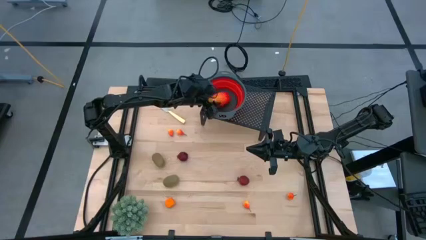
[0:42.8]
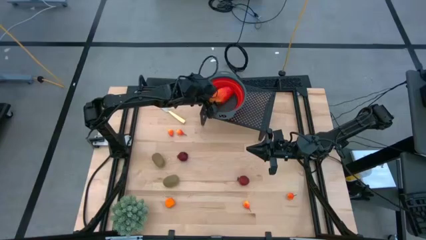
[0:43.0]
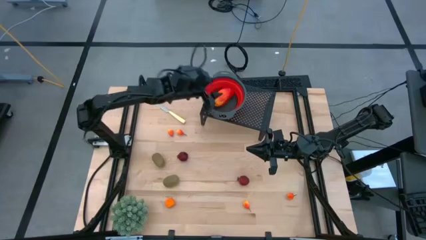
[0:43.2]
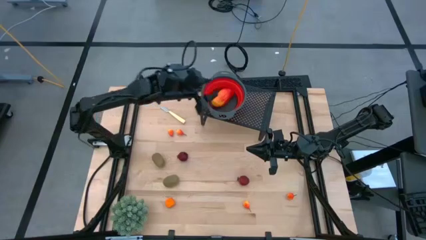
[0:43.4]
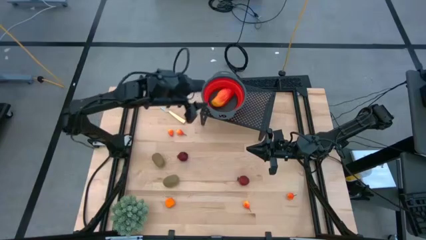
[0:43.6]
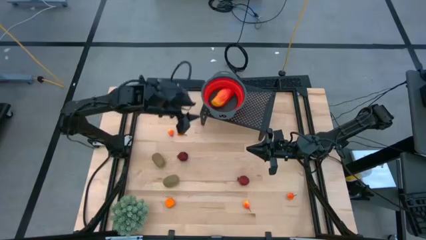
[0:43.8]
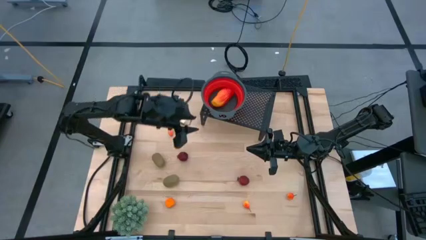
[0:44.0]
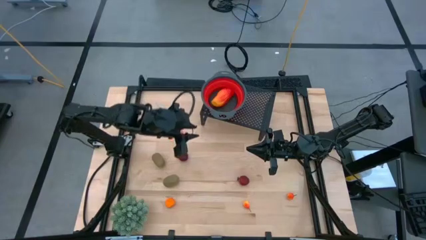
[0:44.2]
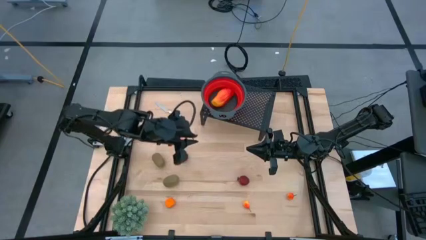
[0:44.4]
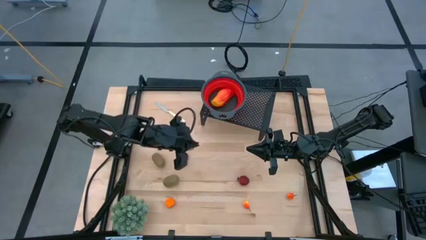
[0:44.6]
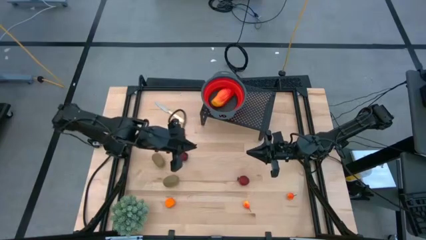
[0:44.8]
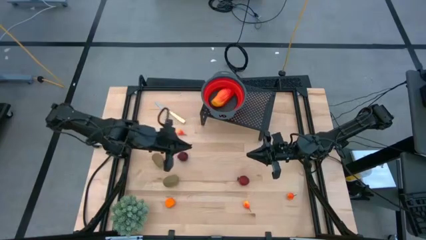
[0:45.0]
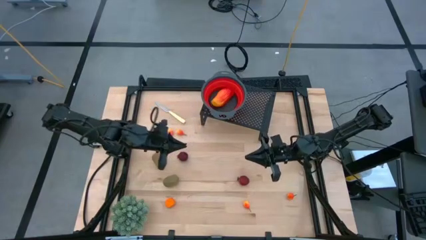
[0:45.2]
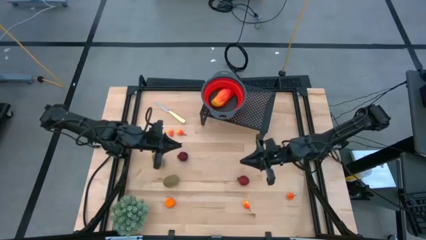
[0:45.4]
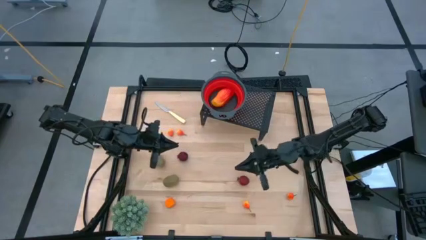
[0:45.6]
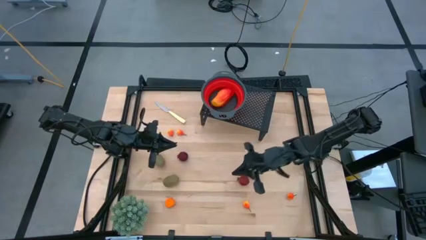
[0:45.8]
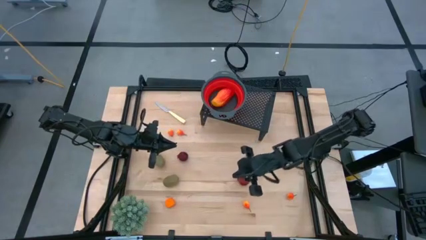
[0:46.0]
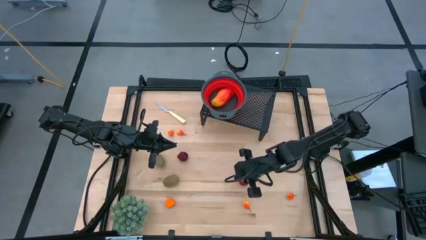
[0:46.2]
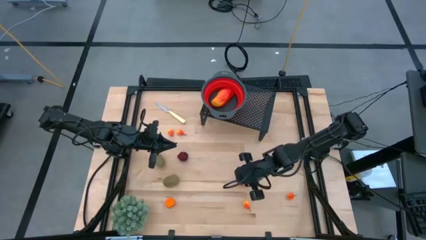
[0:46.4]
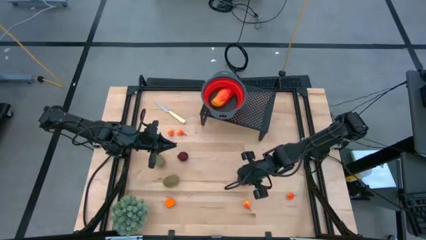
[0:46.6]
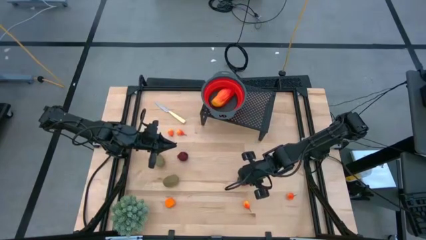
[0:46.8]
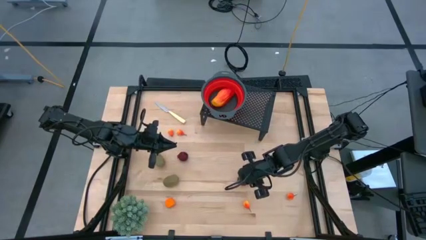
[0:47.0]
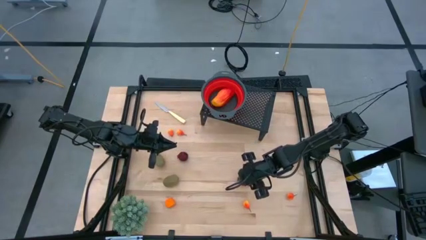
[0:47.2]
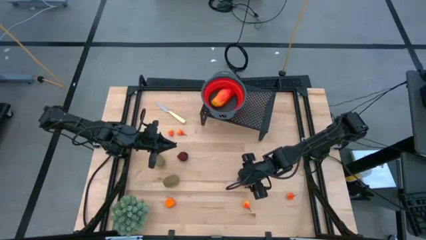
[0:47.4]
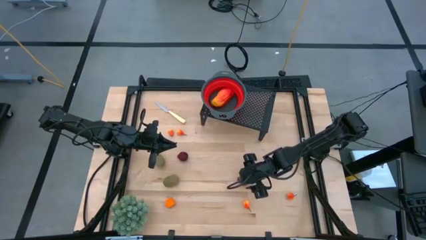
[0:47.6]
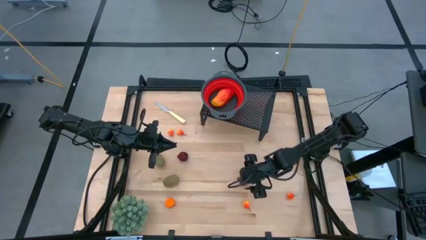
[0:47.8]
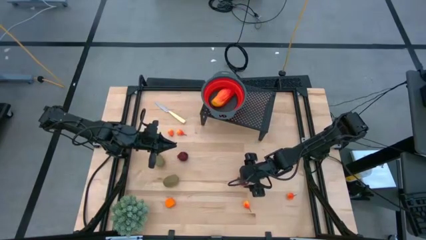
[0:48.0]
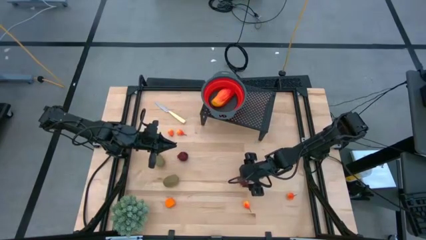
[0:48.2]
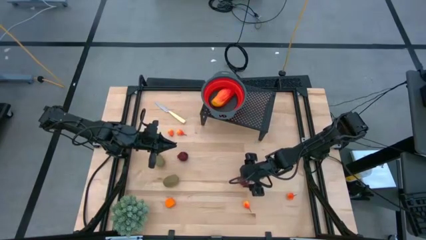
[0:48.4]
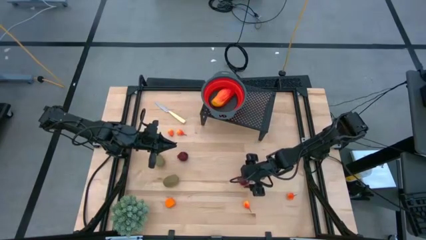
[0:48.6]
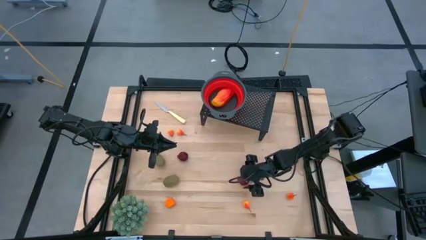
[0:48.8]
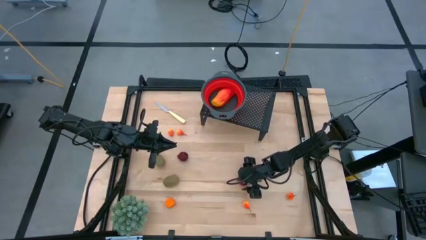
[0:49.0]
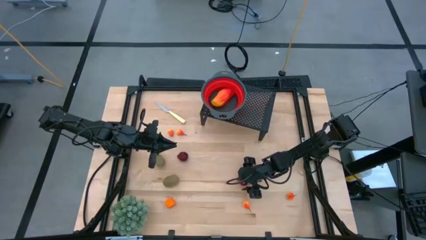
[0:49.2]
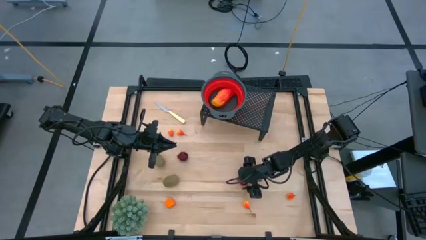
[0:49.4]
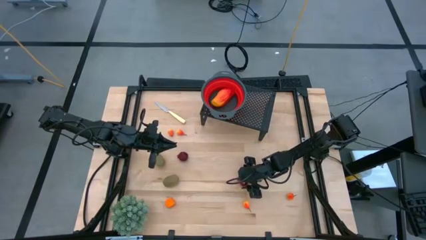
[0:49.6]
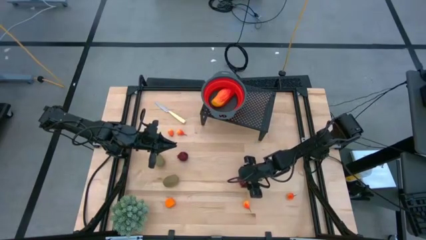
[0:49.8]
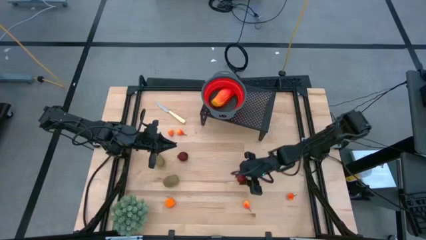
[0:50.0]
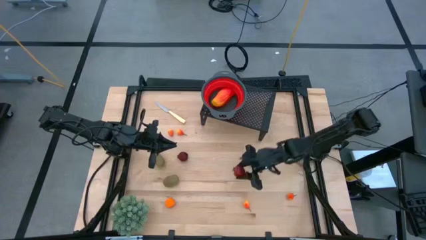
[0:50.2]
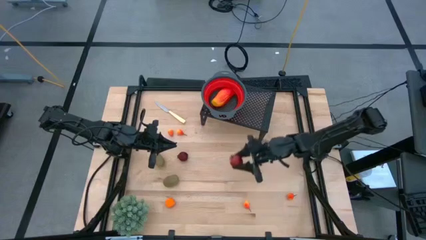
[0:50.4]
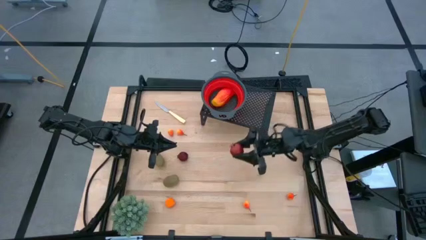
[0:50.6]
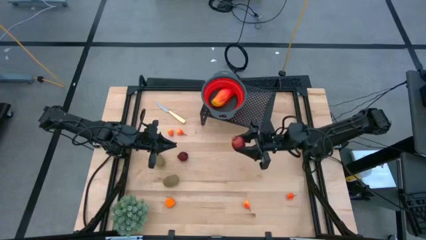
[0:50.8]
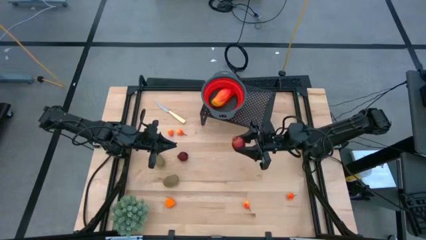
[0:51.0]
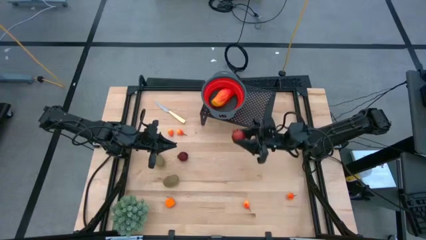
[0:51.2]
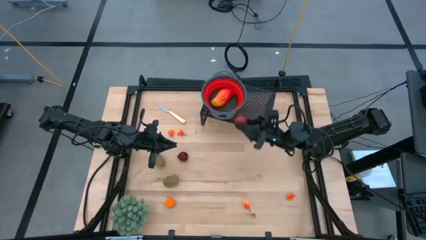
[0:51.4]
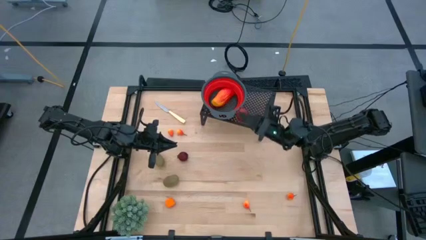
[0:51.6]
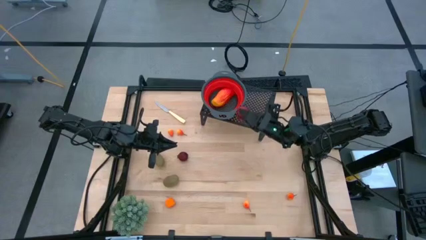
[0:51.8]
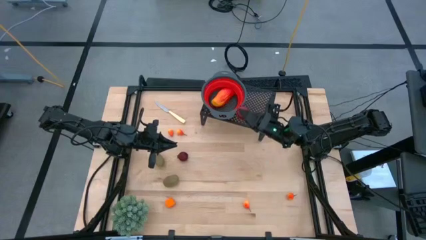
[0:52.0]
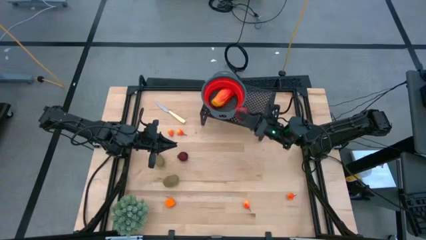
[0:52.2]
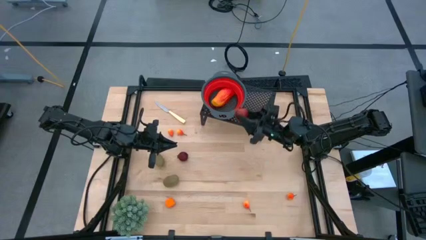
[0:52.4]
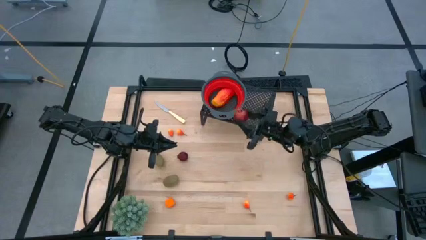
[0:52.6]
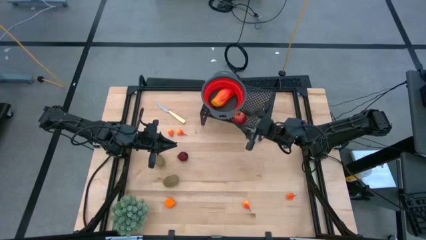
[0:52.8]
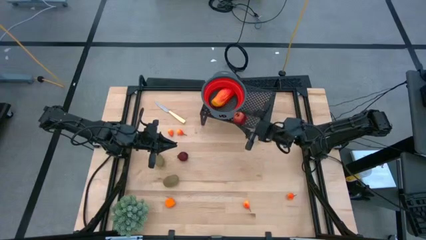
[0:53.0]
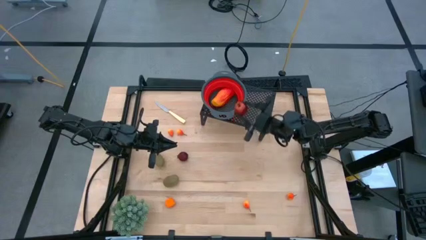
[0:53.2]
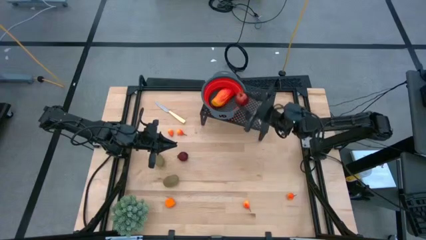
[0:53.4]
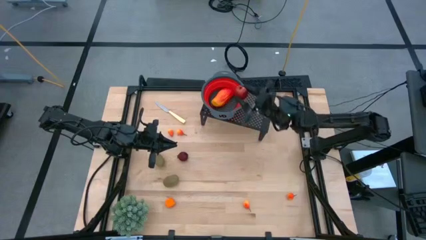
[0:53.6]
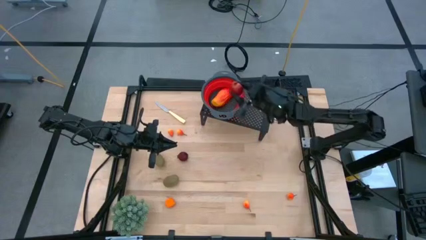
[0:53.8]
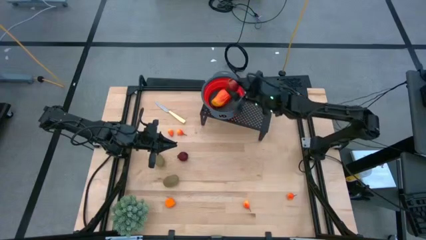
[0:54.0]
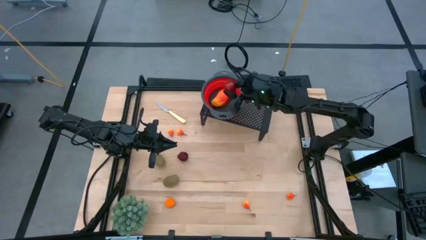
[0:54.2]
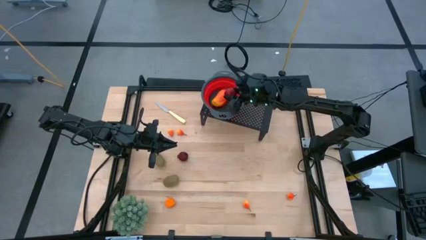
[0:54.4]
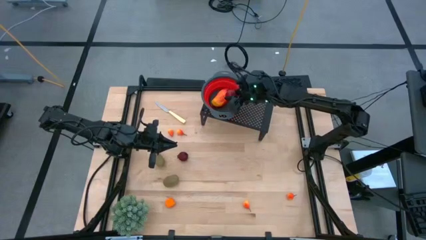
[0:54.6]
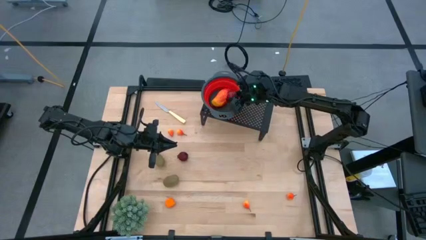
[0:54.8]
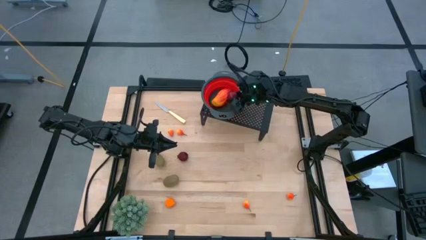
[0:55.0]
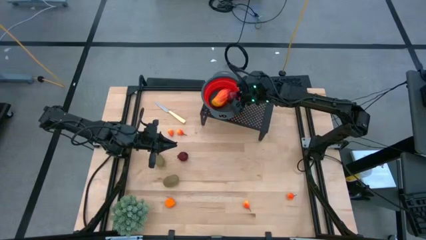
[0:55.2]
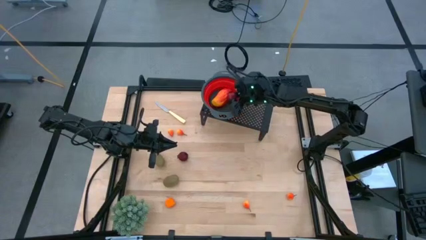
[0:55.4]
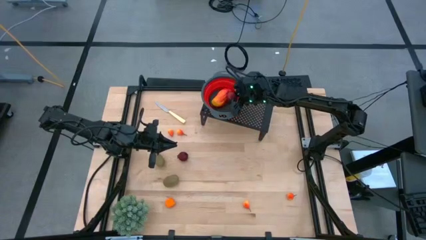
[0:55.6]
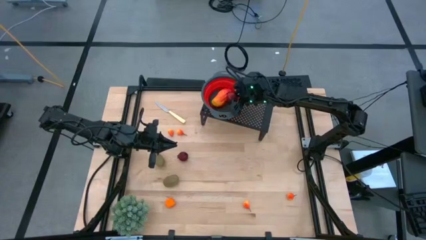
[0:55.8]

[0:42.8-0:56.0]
Task: Pick & Place Fruit
Put the right pomegranate into the strainer bowl on the shelf
